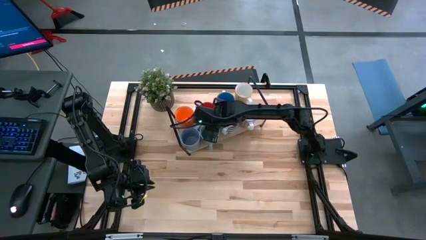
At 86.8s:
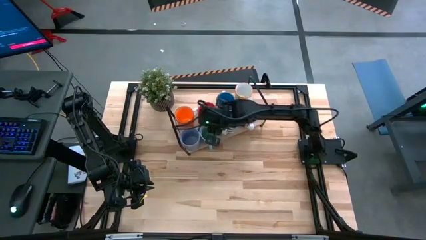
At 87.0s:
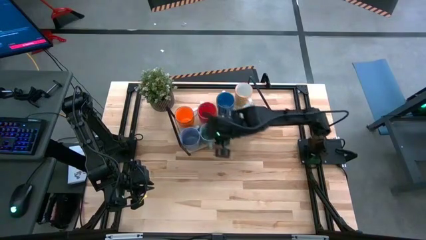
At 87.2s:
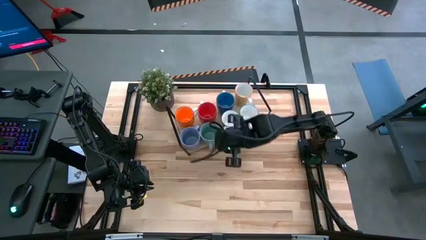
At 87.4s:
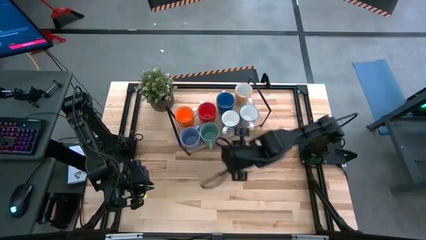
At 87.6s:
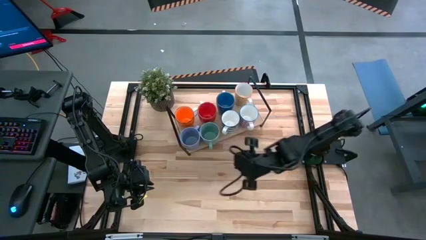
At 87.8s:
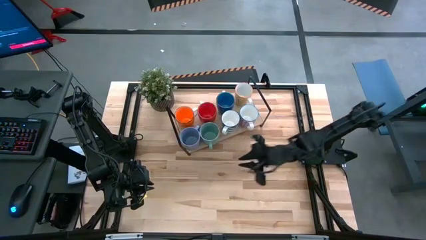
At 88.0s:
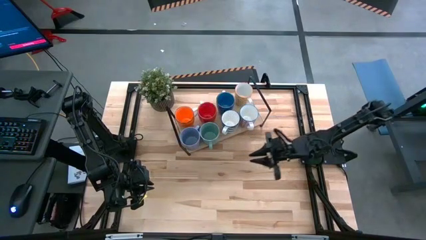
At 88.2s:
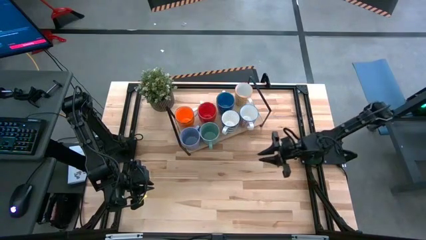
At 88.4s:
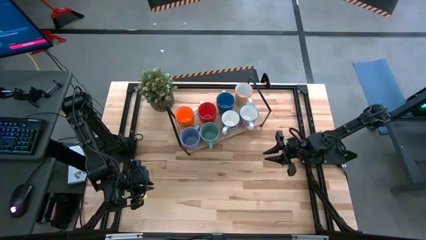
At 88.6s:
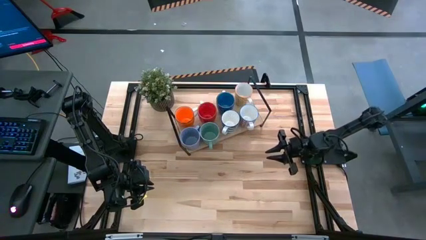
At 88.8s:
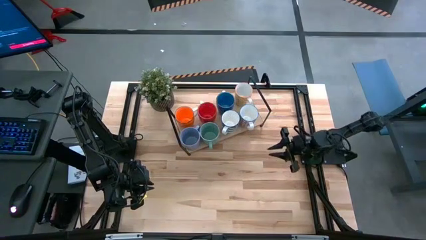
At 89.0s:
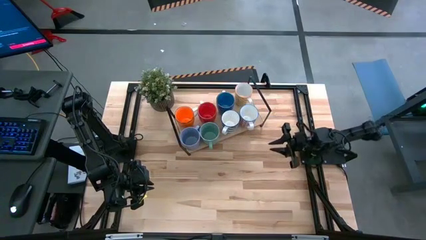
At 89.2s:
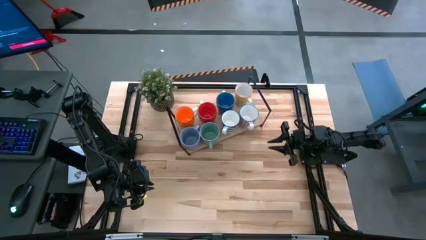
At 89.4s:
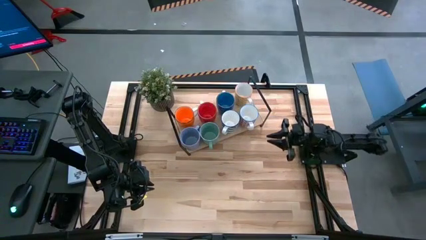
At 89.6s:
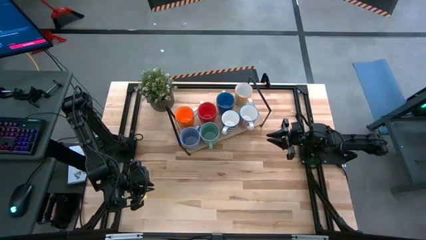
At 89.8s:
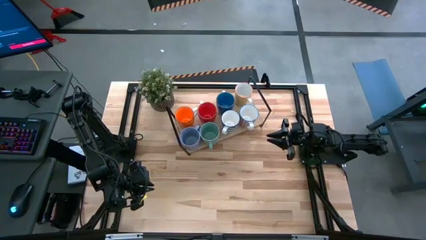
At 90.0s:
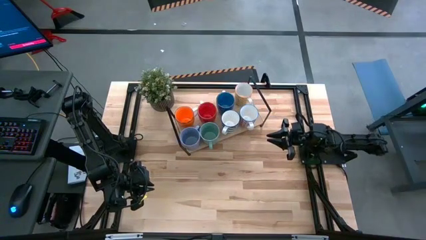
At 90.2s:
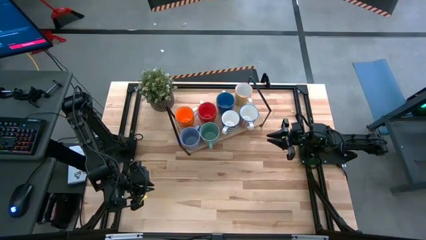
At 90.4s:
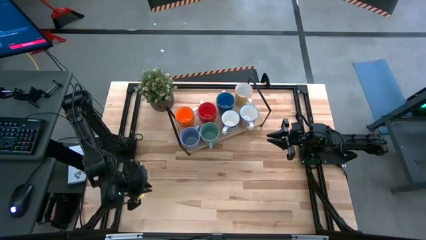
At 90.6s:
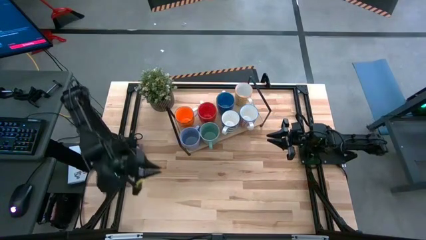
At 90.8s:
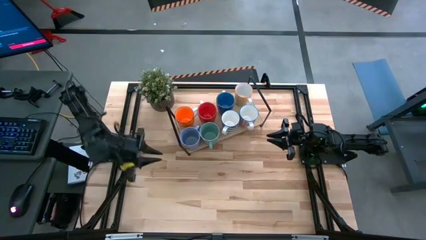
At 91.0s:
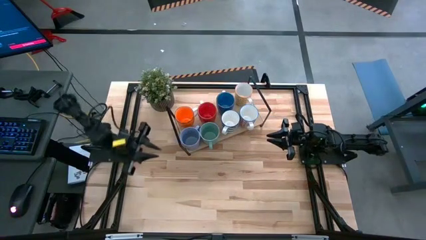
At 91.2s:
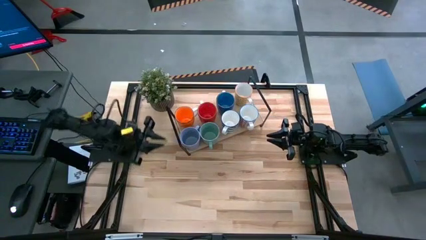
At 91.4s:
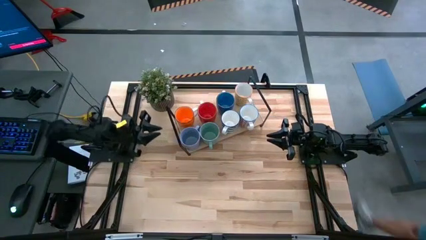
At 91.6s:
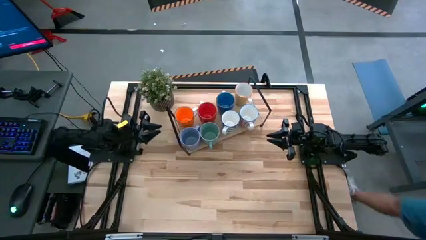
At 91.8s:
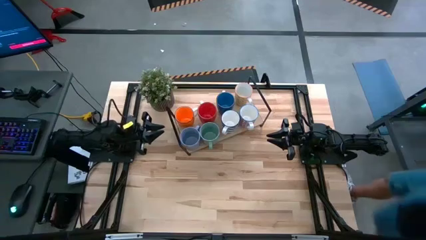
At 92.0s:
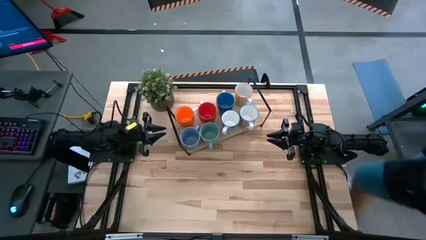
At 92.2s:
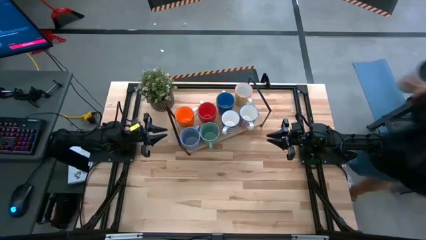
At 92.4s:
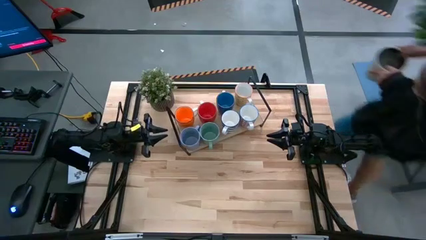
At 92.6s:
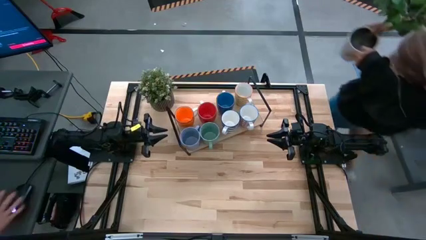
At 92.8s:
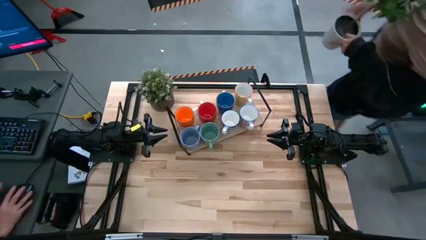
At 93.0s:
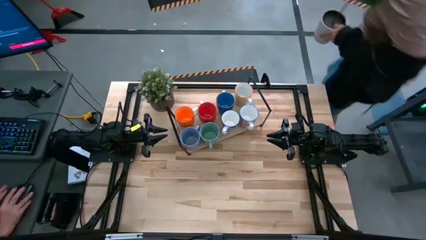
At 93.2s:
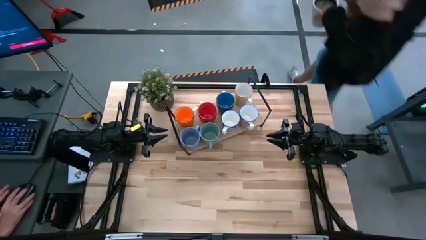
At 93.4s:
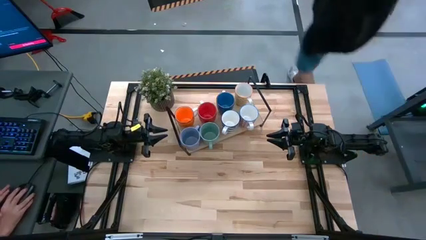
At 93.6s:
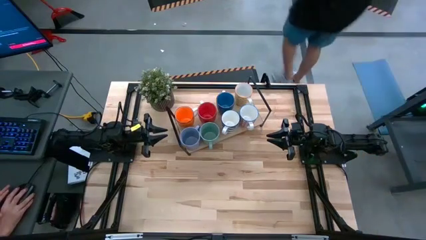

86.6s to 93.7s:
Task: Place coffee mugs
Return to Home Position

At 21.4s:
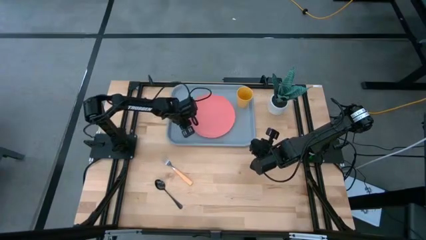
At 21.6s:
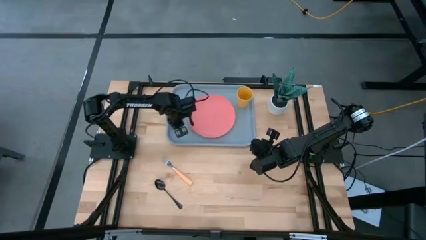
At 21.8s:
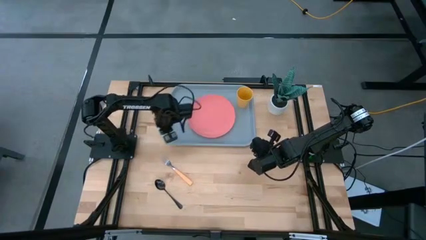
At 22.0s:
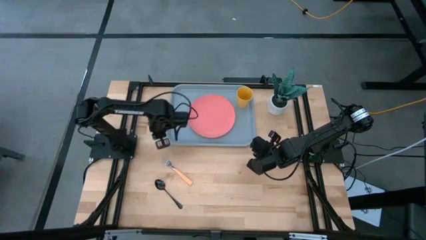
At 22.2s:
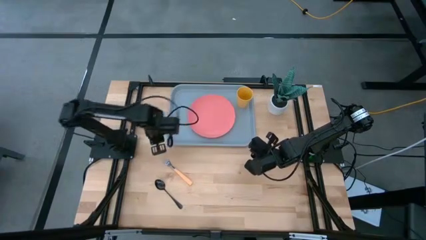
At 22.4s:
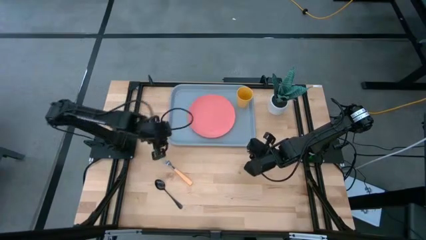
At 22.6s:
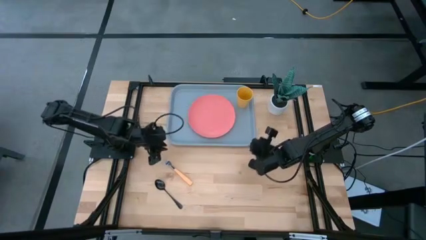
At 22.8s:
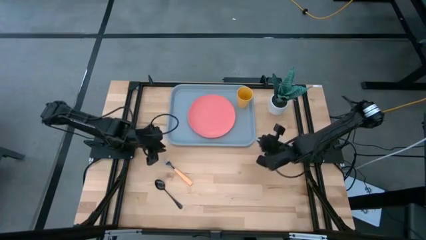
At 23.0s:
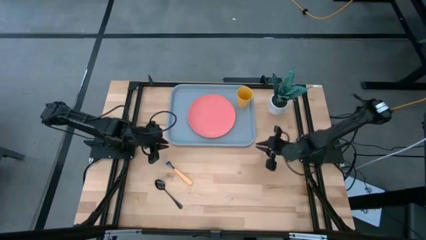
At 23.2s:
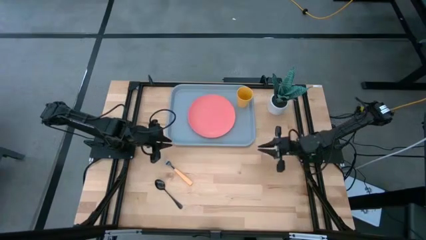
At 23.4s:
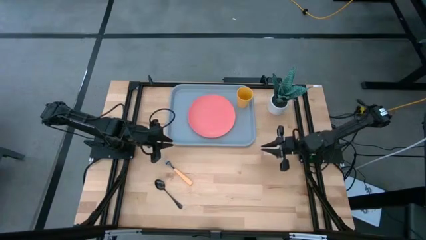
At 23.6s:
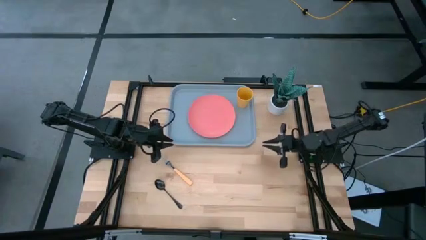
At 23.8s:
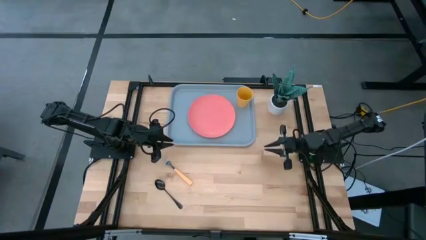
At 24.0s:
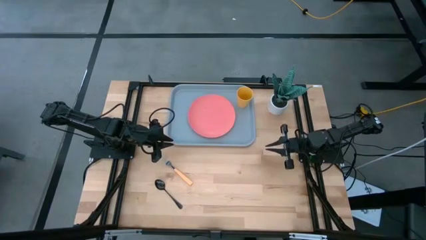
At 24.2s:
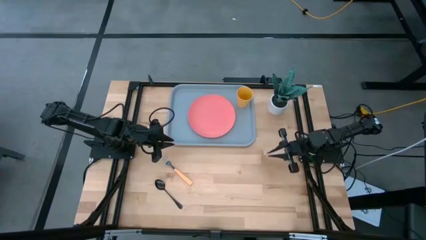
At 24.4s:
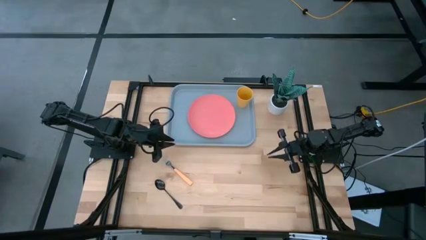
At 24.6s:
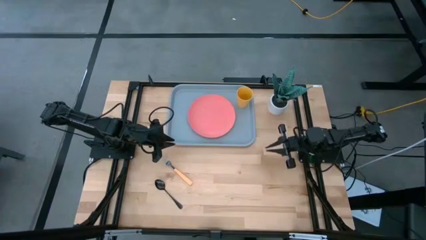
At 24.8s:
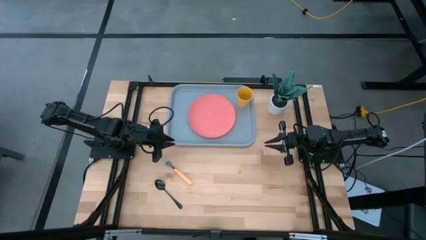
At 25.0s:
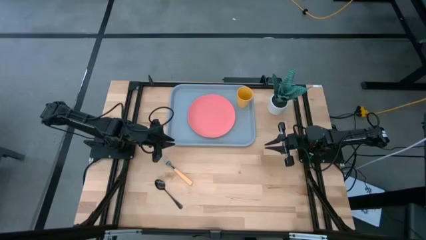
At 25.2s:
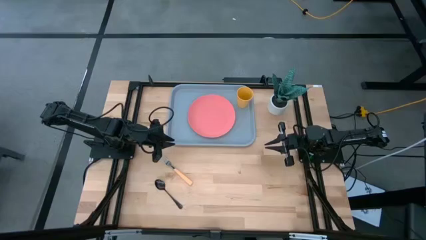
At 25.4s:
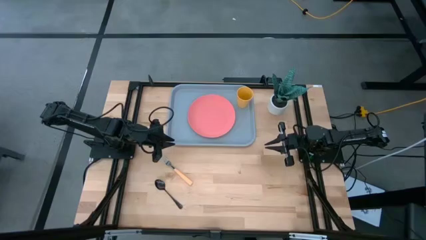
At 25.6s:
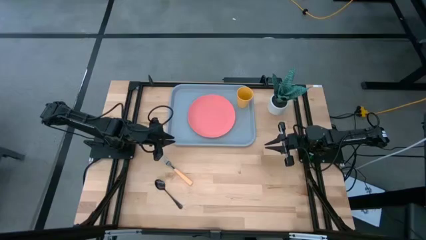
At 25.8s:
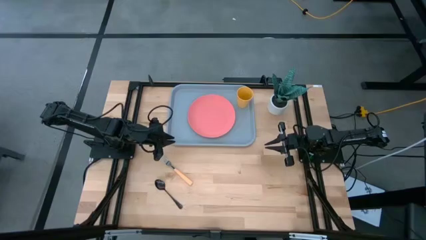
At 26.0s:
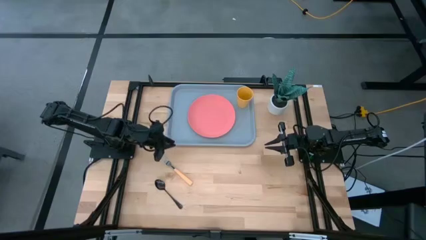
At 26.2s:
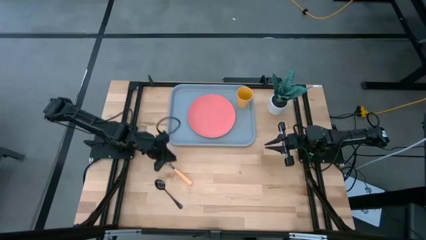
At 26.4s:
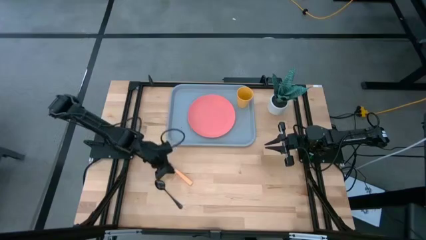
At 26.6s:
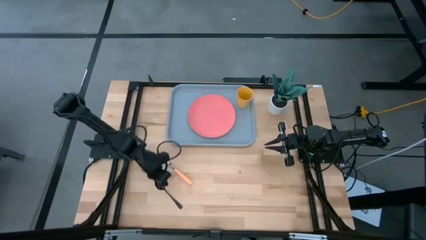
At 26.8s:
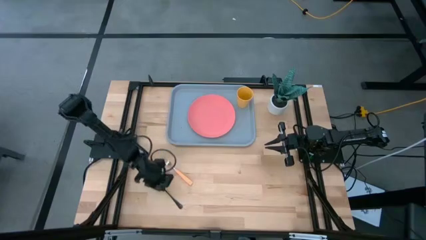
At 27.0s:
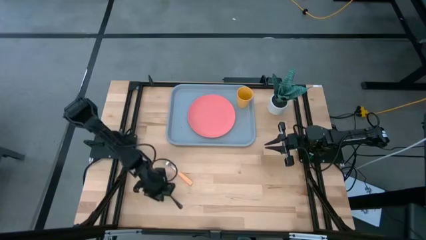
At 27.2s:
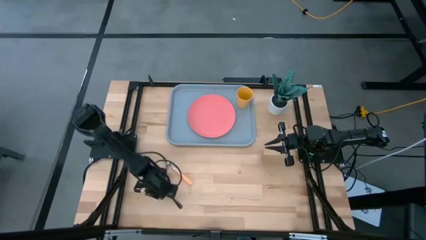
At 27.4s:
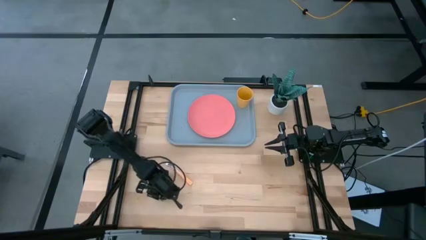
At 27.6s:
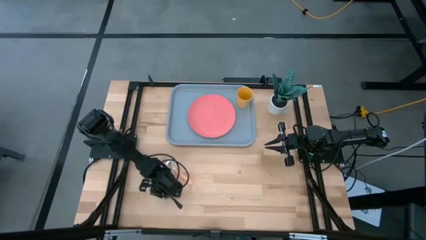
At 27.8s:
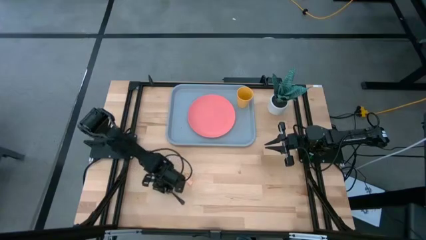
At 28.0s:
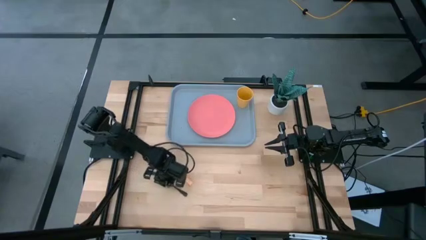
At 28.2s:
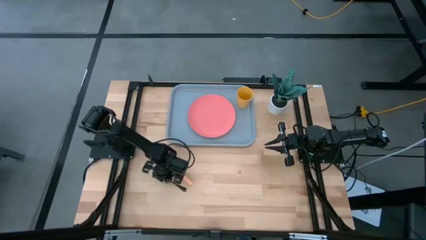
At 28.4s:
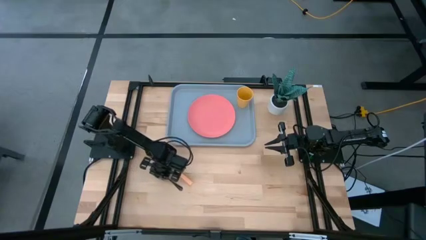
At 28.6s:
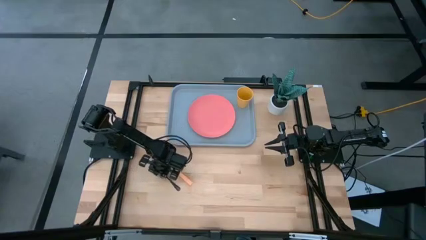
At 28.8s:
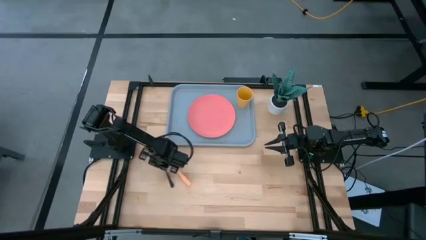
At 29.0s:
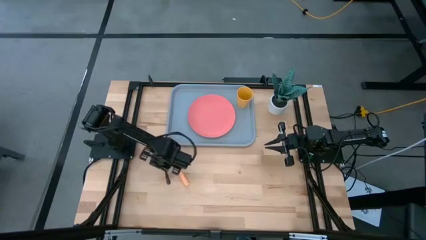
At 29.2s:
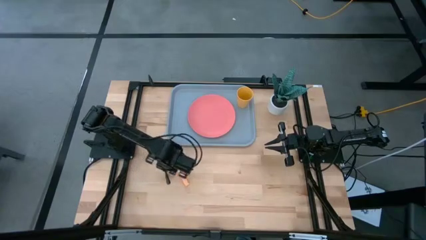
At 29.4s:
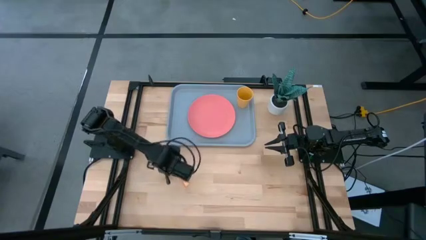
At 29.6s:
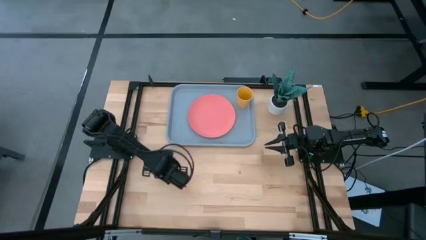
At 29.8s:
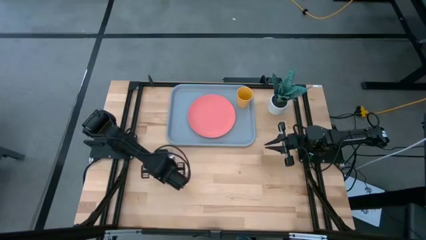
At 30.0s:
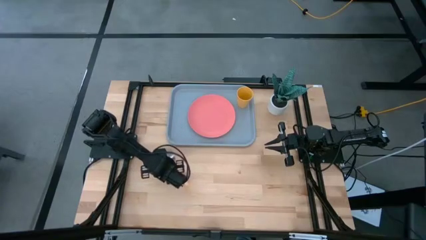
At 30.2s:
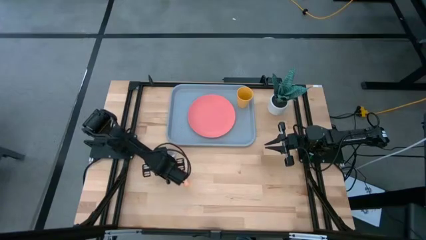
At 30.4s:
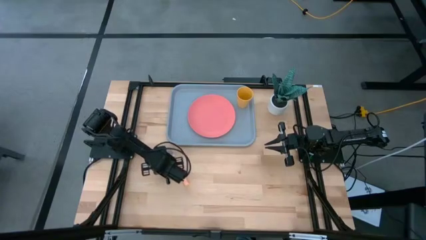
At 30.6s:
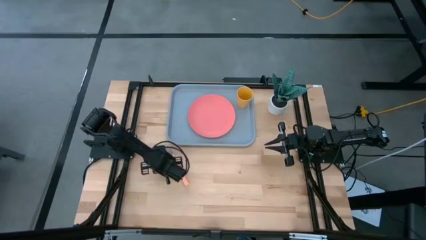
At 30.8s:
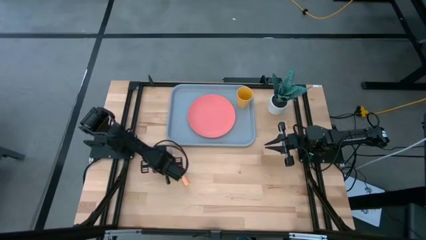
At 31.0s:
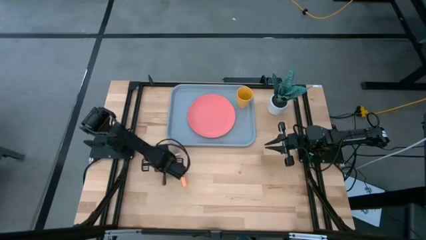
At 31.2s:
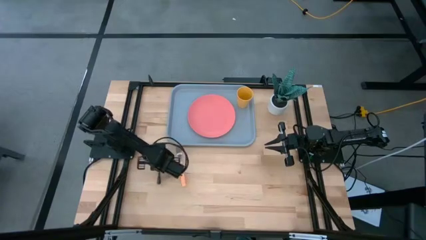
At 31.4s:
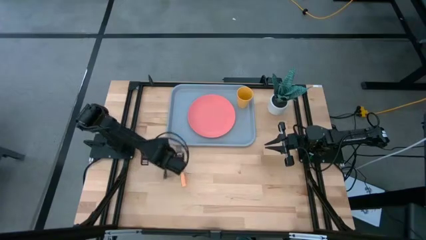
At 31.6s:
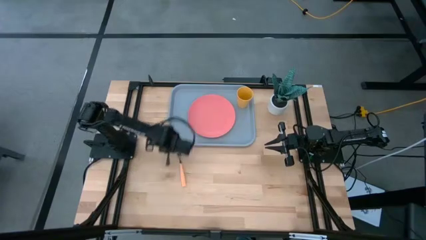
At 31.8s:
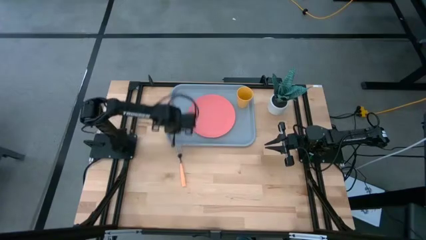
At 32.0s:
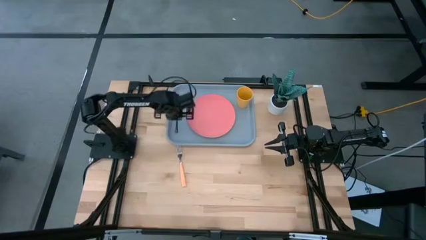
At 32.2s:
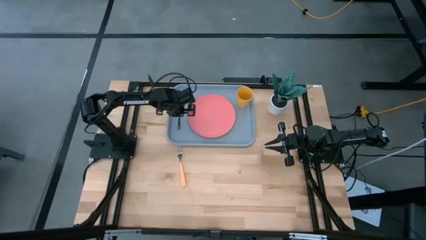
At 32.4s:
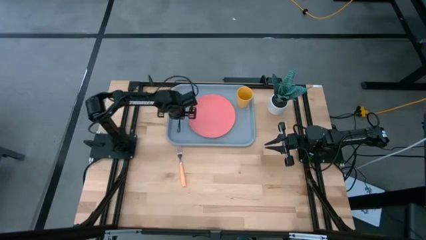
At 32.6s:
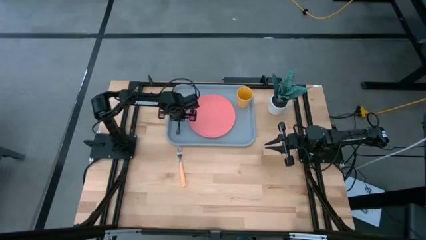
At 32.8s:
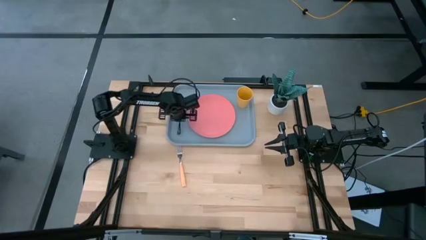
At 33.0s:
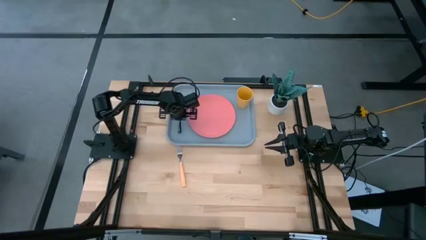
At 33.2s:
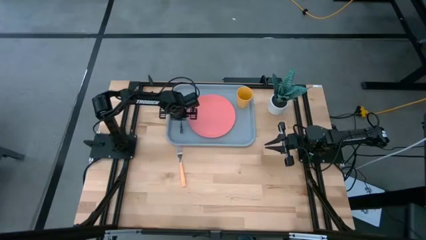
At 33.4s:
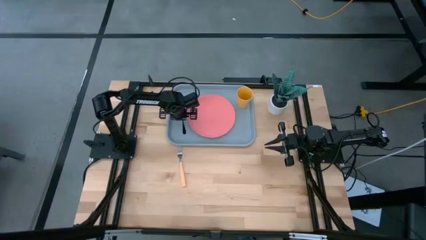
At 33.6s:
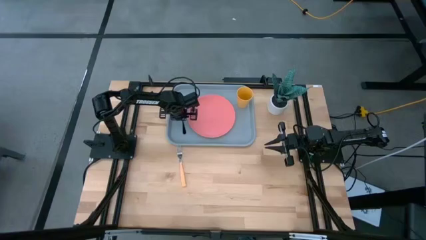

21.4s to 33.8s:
Task: Pick and place plate/cup/fork/spoon on tray
Put the black spoon on the blue tray to the left of the pink plate
